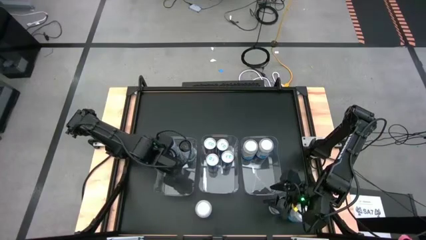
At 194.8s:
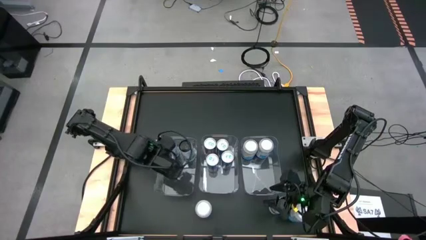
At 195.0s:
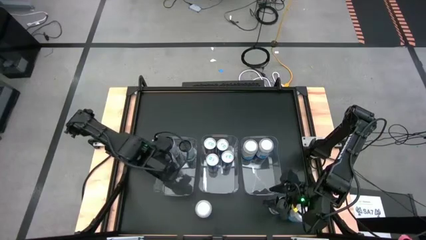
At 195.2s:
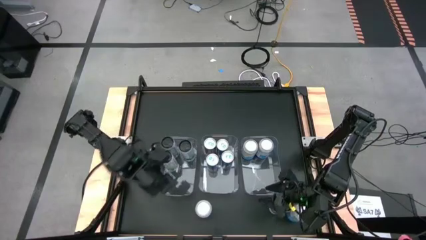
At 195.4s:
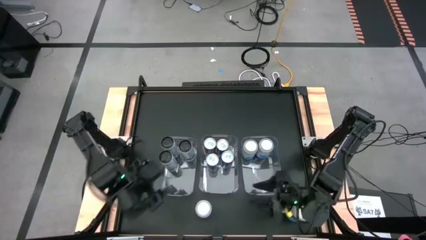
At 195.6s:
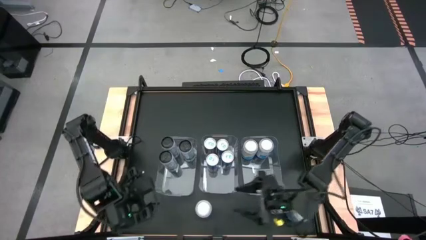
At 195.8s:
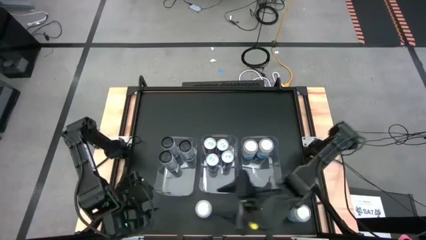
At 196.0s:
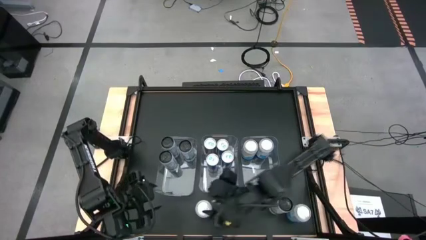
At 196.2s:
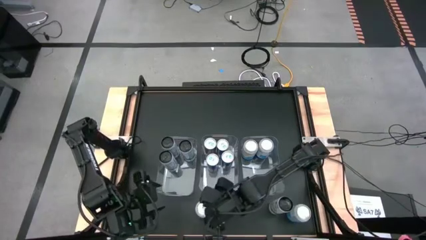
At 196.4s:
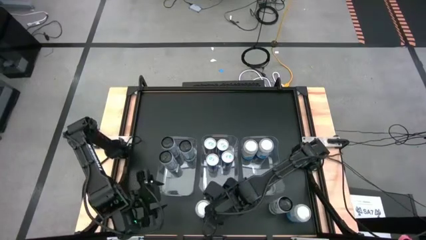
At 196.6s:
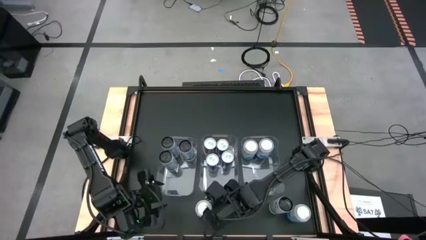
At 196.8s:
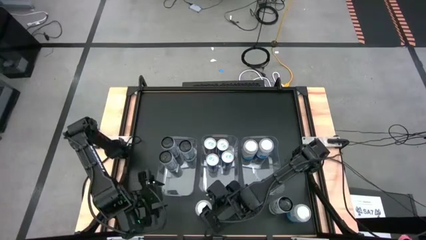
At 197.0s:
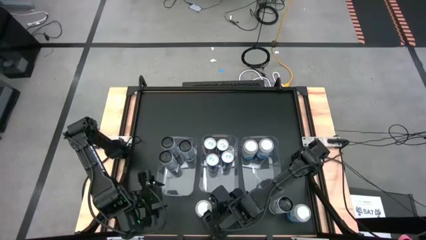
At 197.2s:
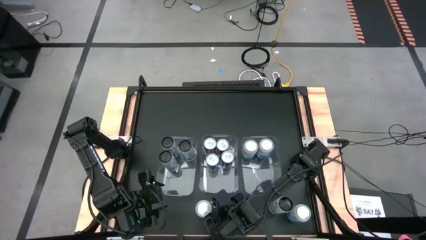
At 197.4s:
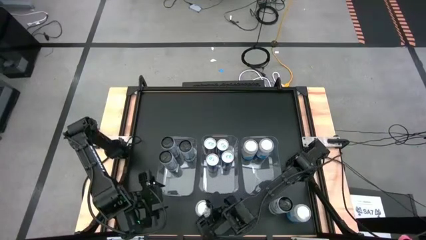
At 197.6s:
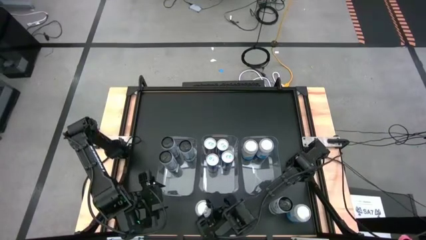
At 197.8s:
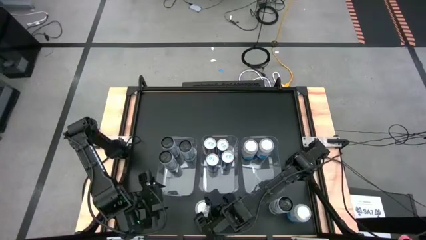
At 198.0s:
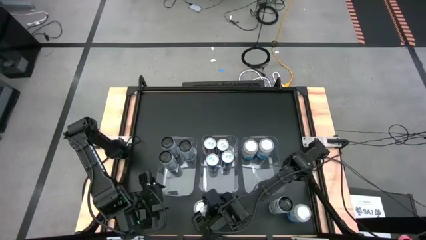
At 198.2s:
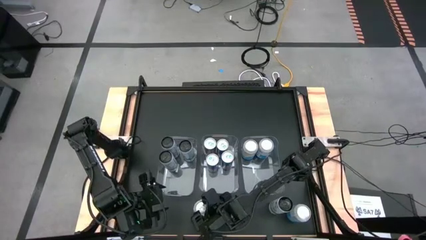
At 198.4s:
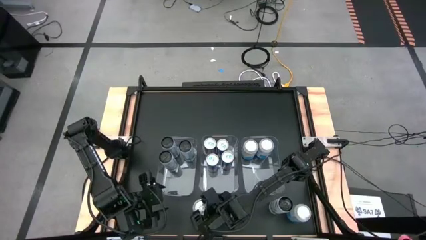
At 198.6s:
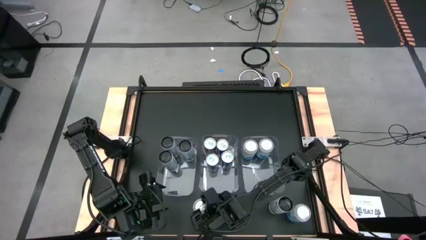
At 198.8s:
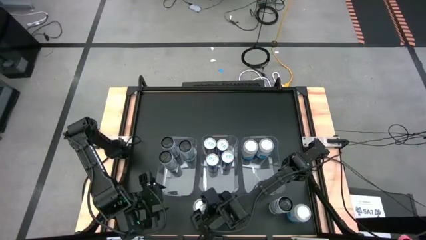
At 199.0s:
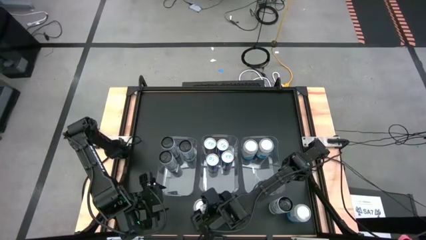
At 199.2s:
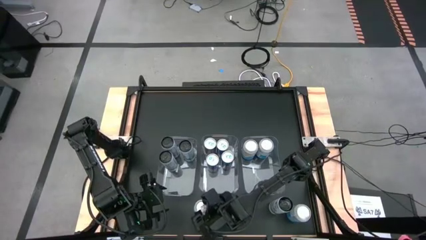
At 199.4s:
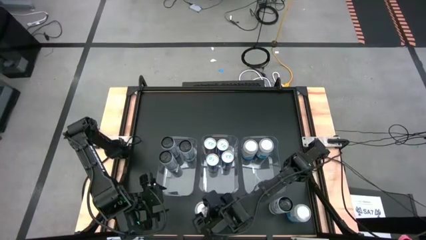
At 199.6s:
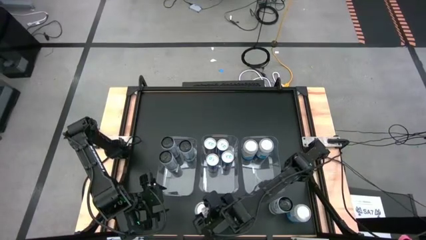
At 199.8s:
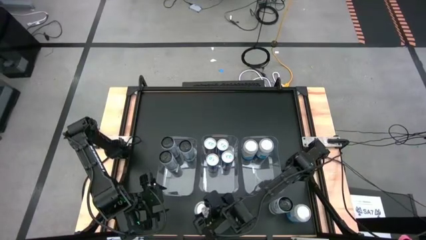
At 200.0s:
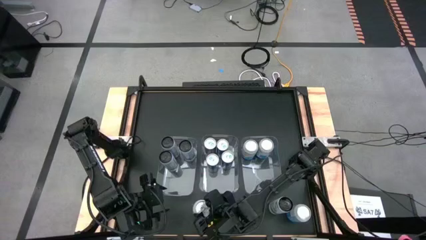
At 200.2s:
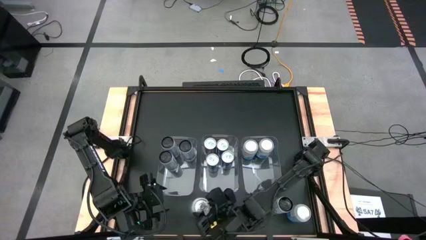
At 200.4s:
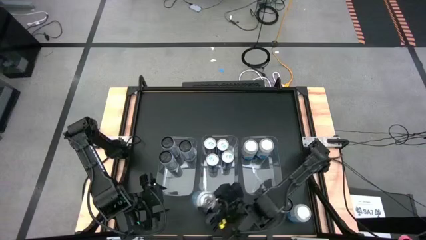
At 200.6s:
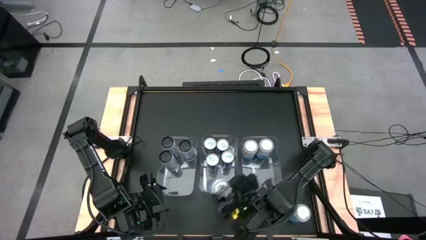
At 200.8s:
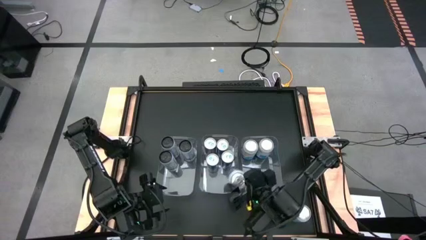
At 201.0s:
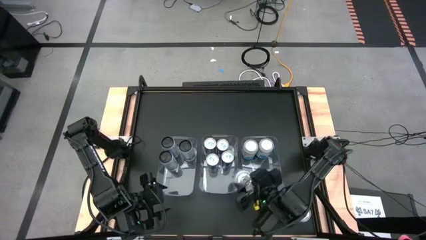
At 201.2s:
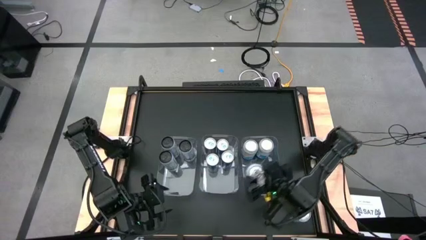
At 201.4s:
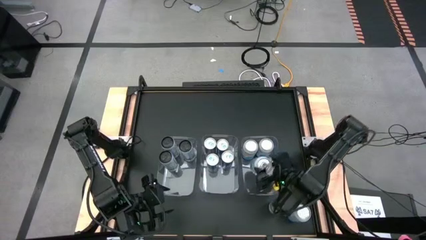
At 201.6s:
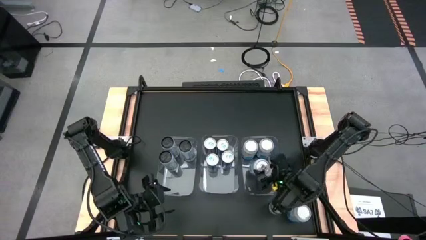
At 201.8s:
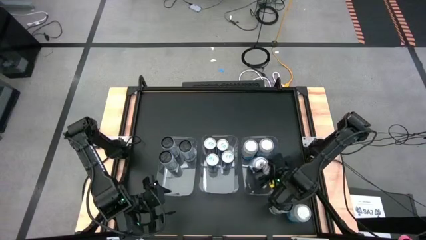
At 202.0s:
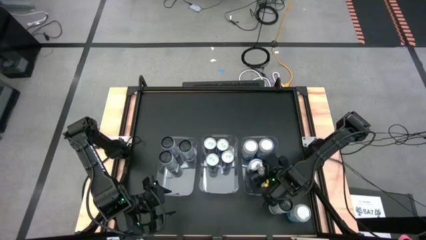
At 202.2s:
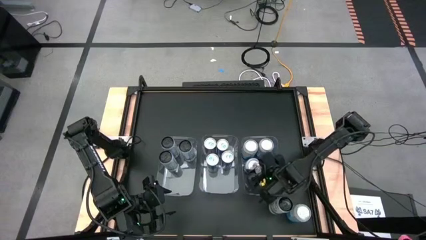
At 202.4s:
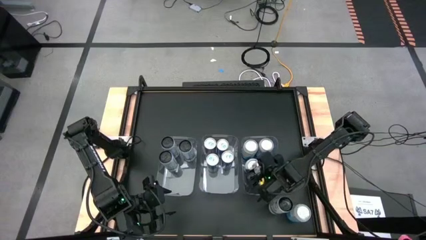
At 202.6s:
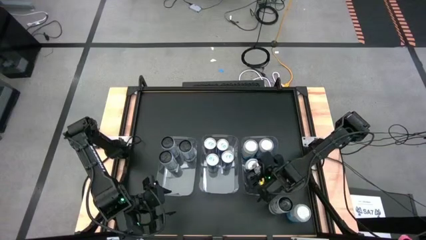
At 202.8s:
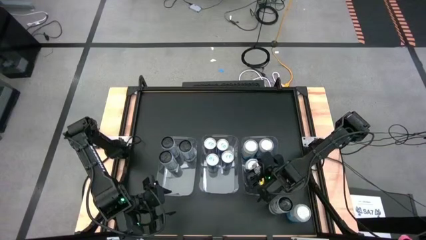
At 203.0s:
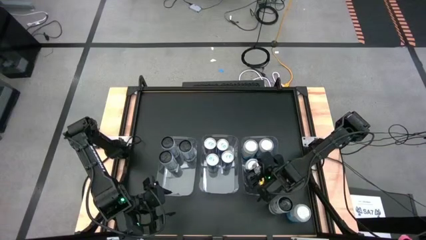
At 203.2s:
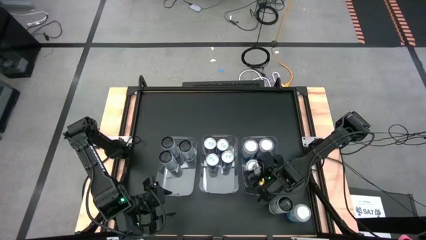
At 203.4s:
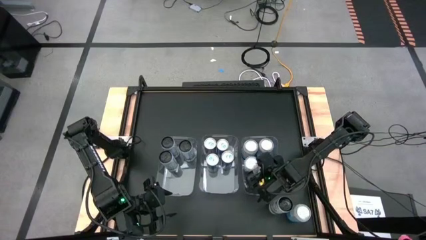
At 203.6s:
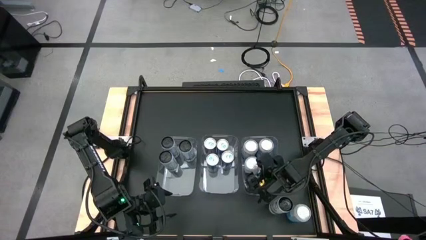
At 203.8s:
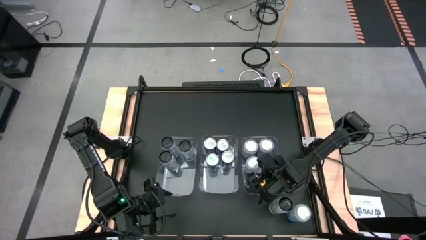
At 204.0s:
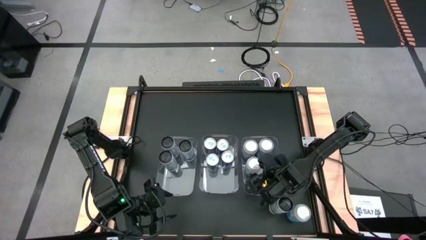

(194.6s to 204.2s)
Task: Sort soda cans
Put the left white and blue soda can into the right transparent bin

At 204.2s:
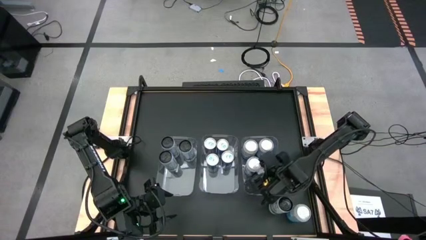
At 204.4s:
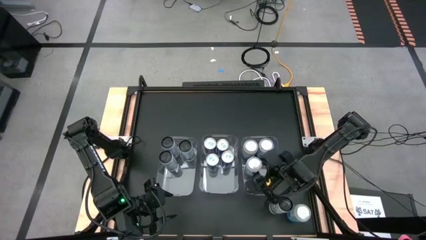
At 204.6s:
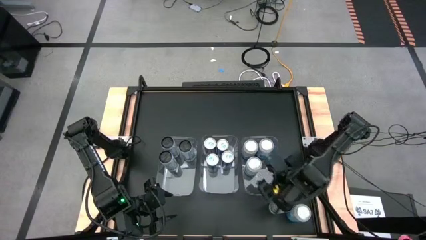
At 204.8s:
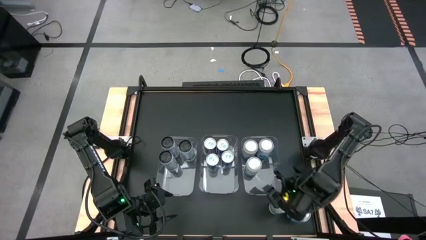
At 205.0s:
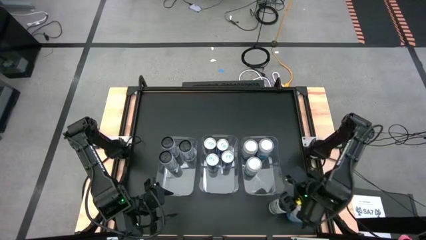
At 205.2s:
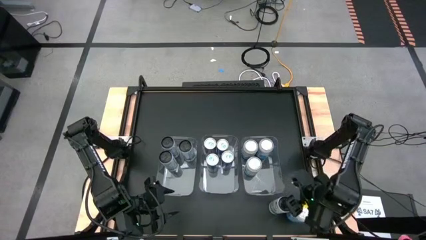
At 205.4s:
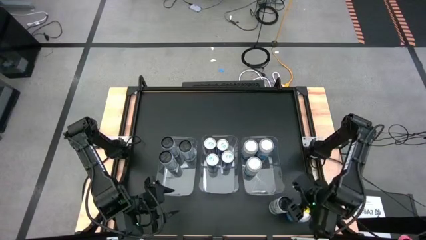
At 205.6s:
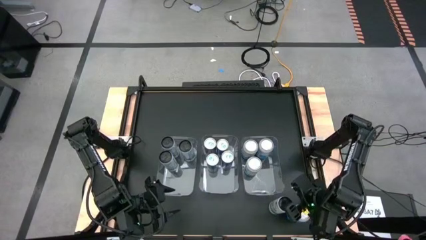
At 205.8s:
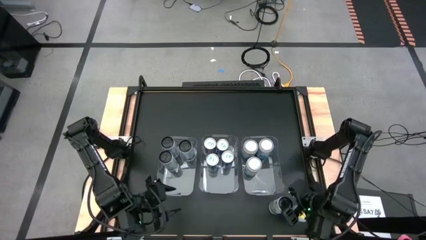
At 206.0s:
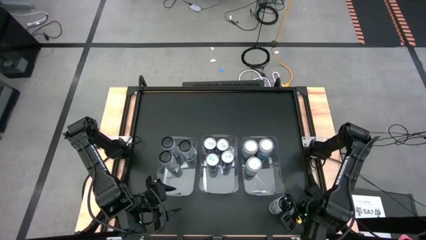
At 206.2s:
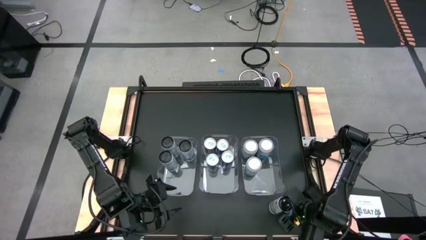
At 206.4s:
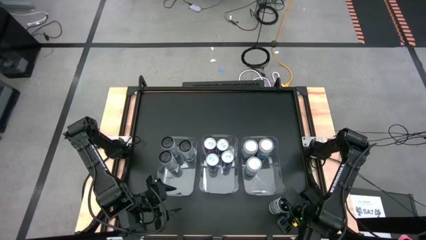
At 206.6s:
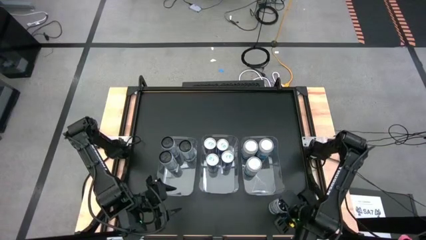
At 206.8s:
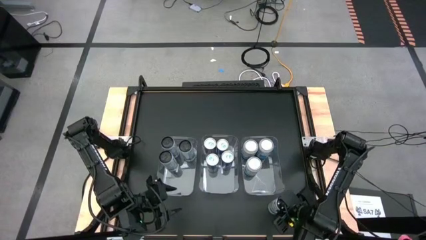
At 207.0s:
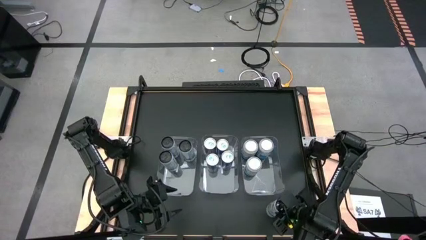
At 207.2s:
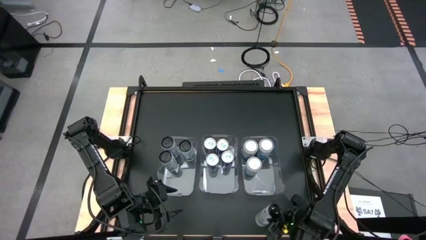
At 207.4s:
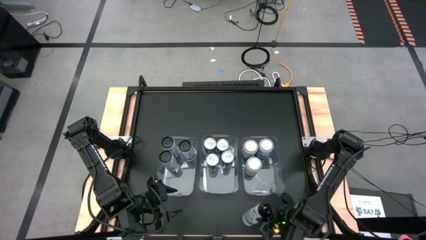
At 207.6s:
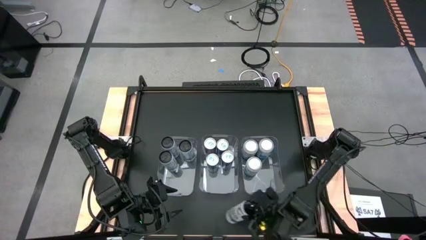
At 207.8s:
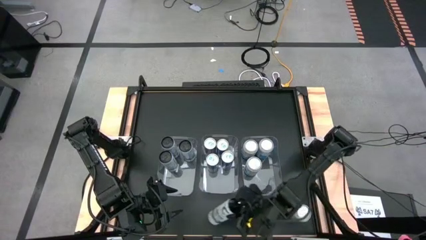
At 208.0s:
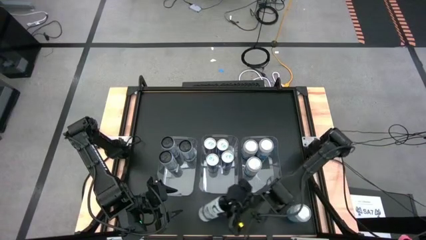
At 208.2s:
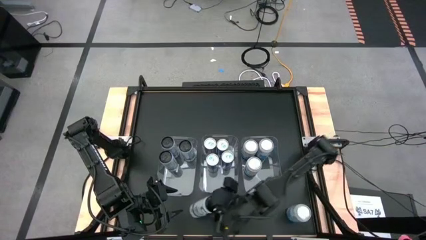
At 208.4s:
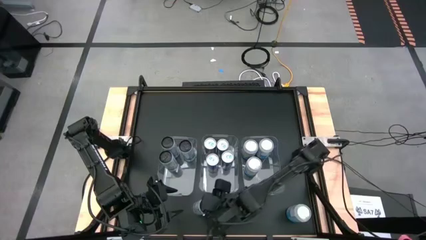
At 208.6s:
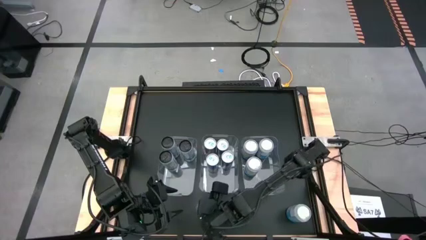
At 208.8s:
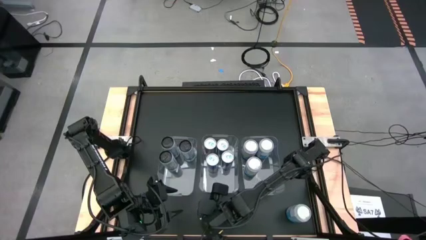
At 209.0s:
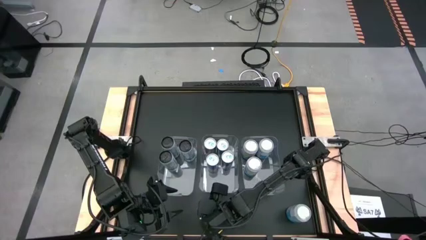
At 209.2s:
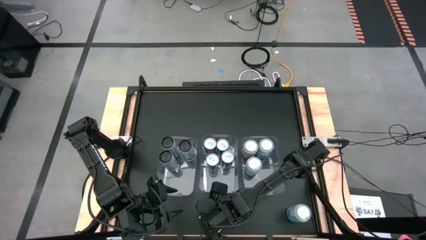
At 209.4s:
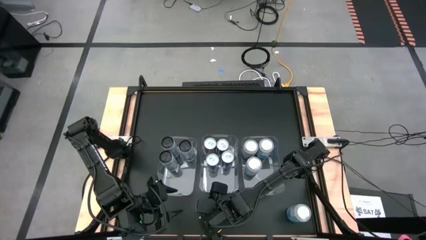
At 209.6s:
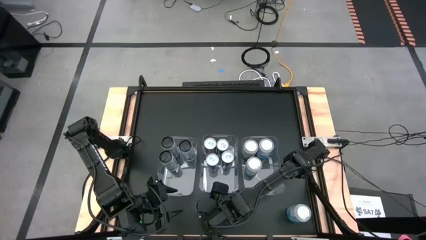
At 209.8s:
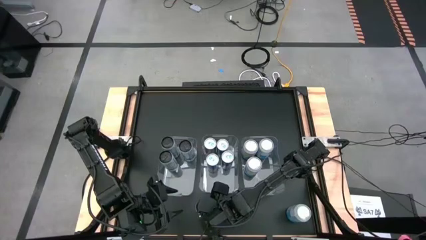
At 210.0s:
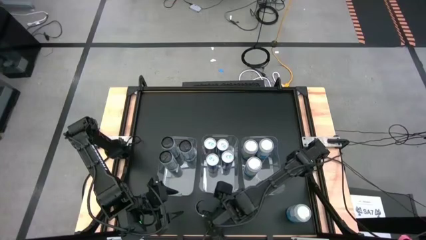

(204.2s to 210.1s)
Move the white soda can to the left of the table

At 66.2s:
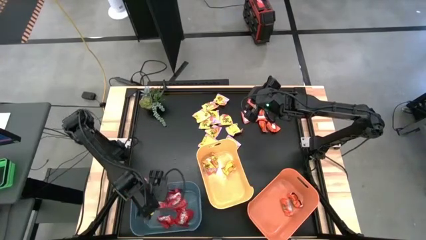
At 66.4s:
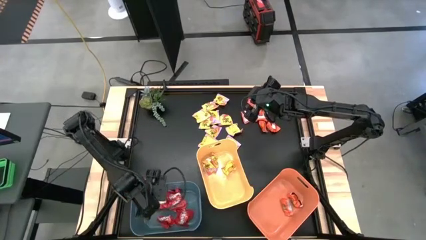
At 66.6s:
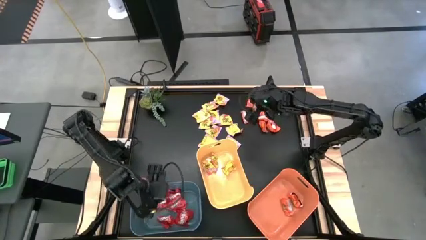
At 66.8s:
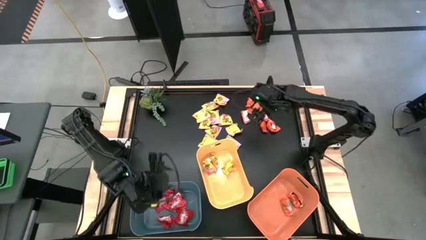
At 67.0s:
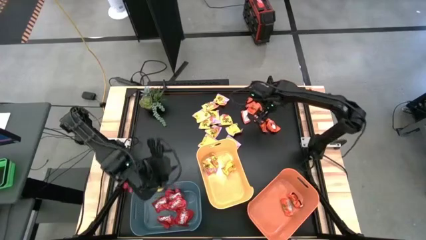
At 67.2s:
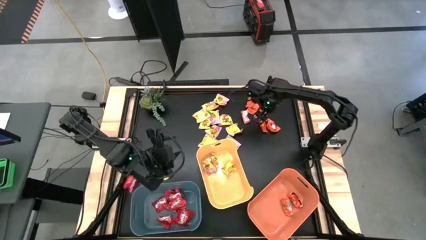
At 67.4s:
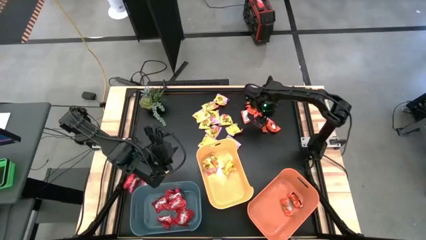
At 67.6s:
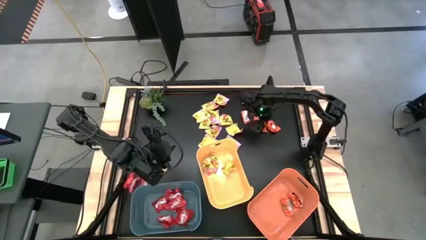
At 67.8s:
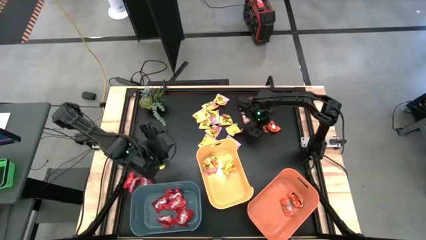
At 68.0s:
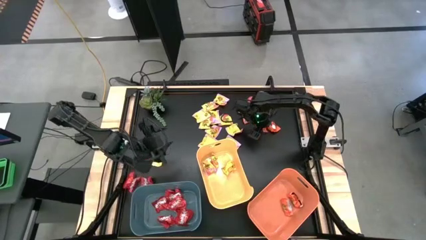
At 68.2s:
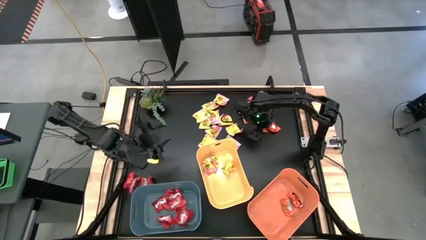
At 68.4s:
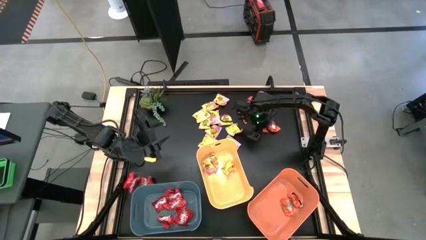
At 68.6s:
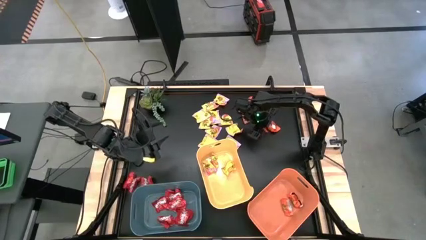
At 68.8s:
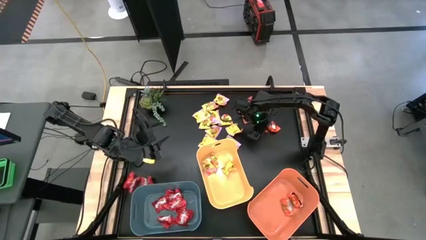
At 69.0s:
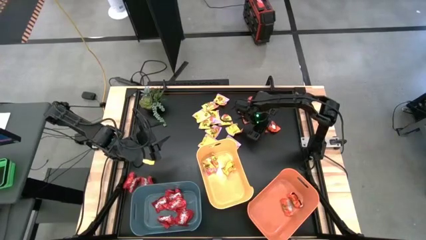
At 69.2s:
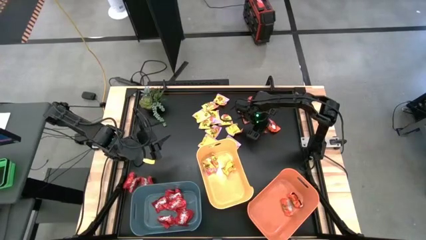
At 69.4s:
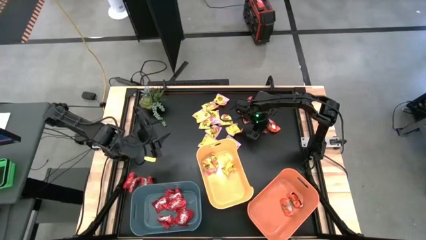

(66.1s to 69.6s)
Task: Sort candy
Put the orange chocolate into the orange bin
